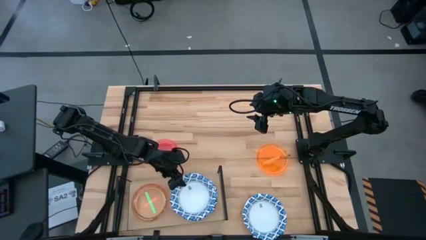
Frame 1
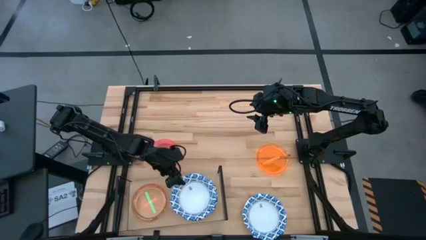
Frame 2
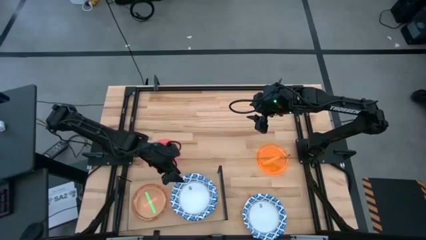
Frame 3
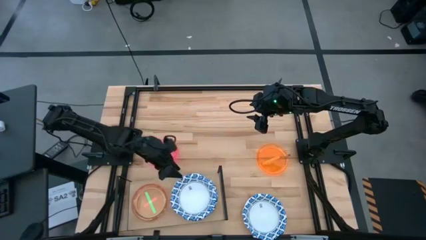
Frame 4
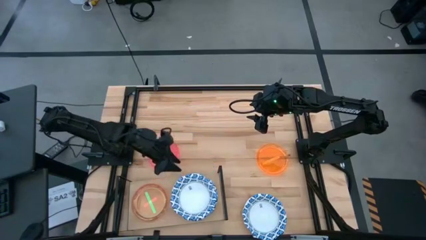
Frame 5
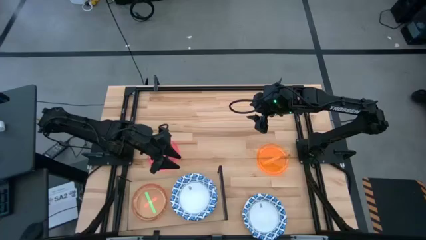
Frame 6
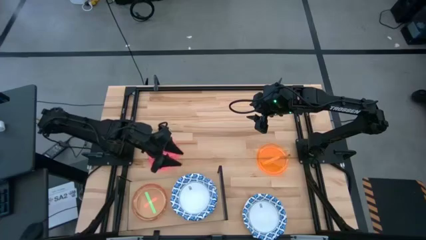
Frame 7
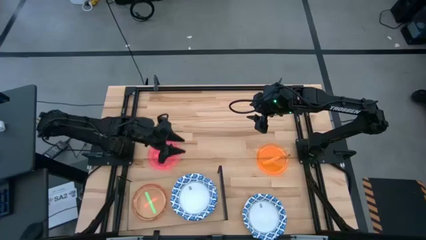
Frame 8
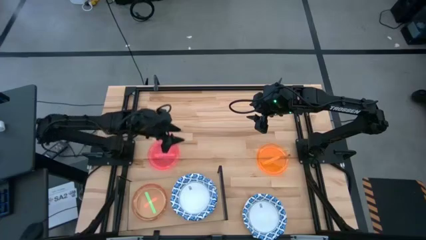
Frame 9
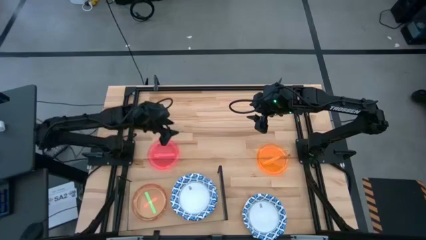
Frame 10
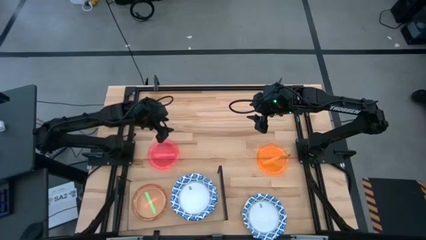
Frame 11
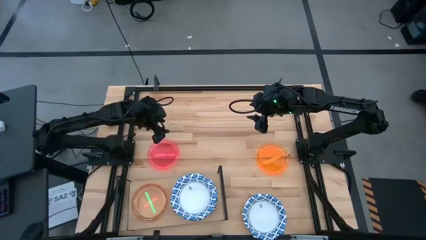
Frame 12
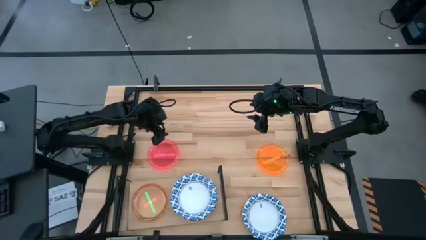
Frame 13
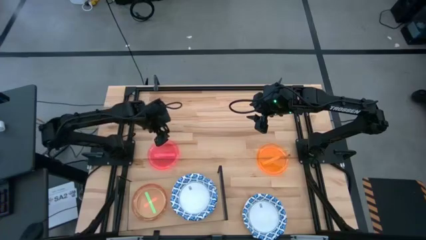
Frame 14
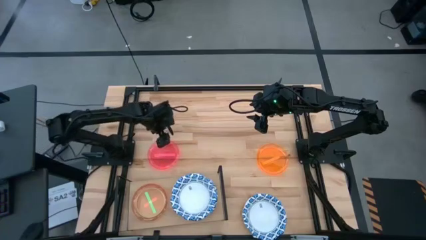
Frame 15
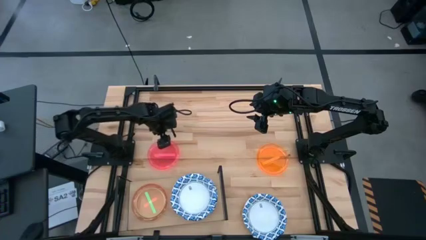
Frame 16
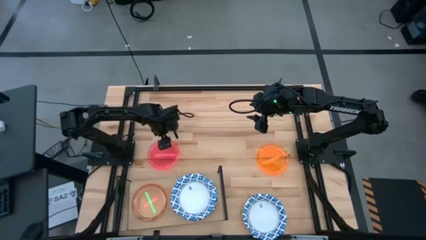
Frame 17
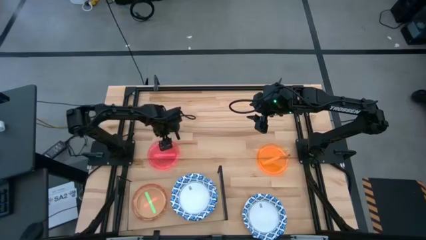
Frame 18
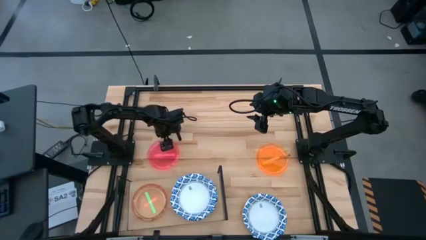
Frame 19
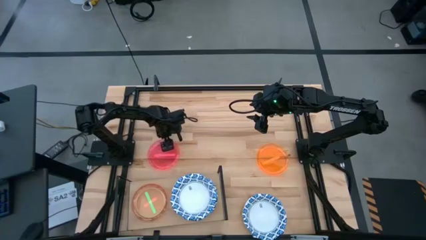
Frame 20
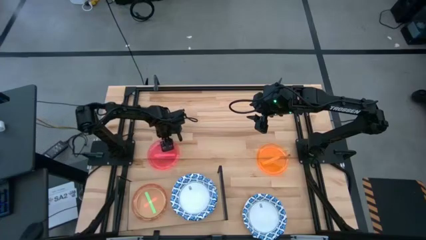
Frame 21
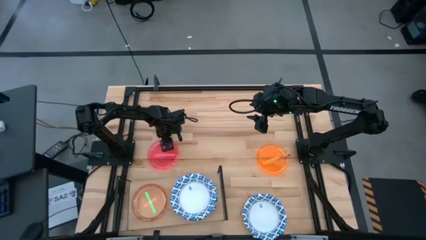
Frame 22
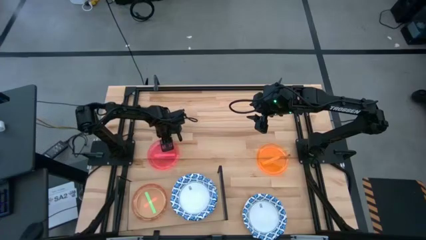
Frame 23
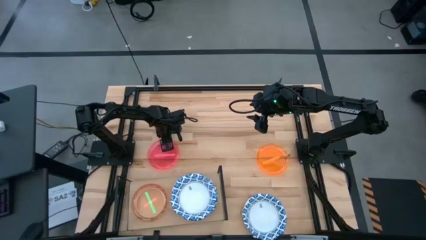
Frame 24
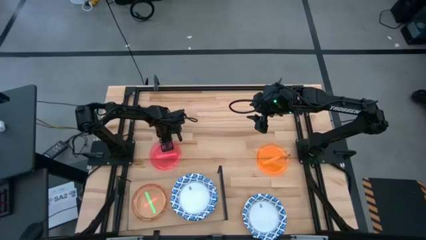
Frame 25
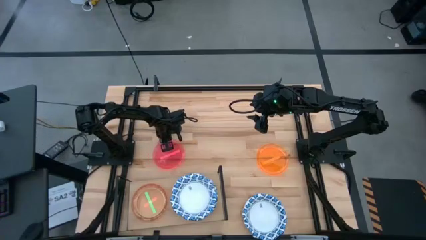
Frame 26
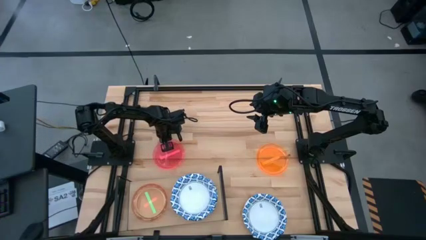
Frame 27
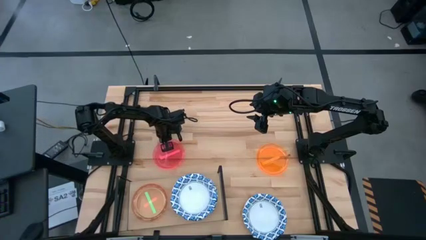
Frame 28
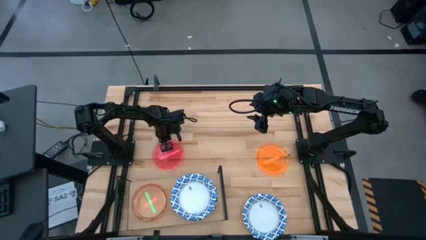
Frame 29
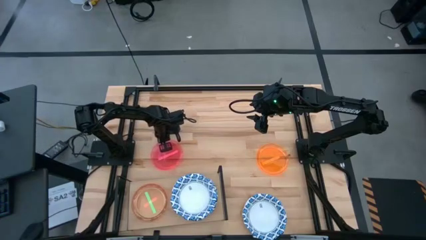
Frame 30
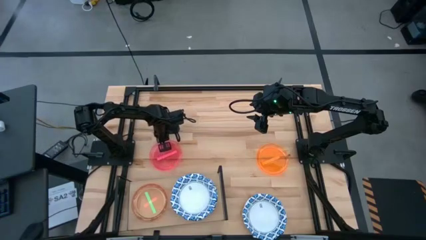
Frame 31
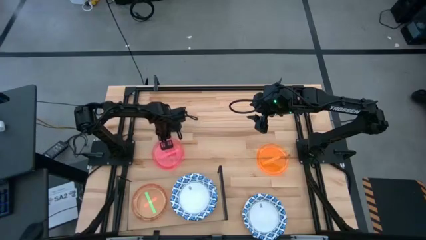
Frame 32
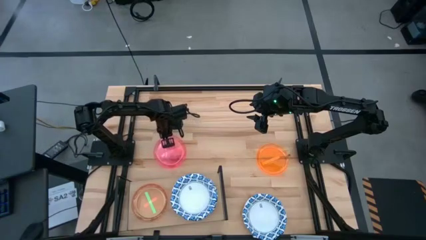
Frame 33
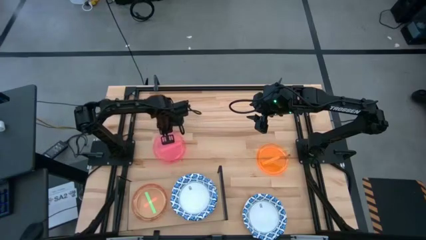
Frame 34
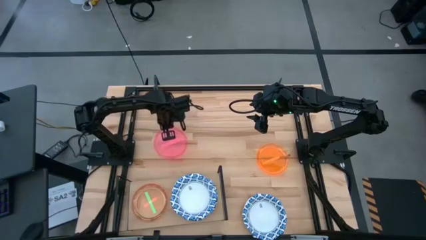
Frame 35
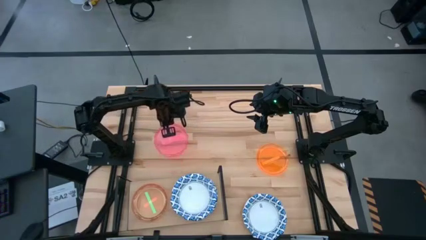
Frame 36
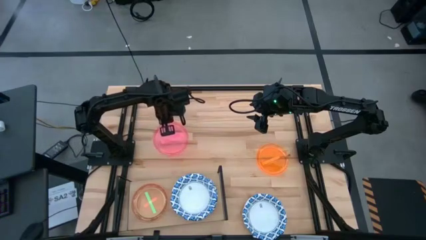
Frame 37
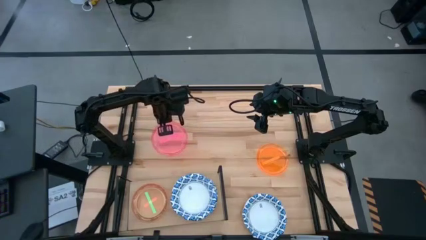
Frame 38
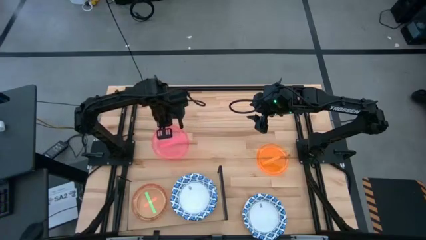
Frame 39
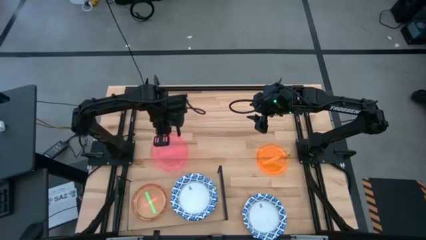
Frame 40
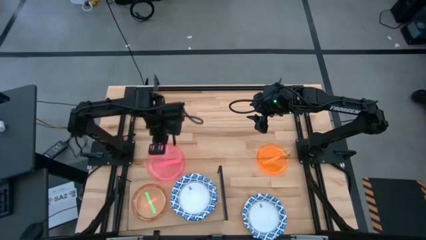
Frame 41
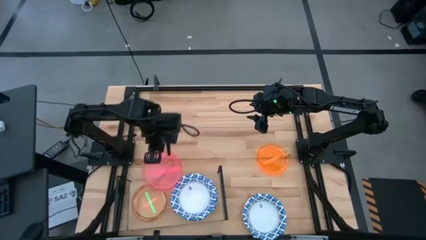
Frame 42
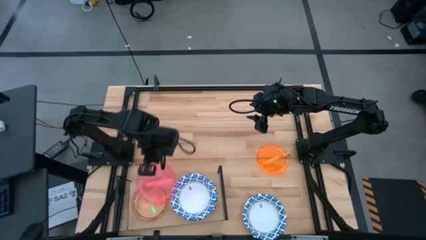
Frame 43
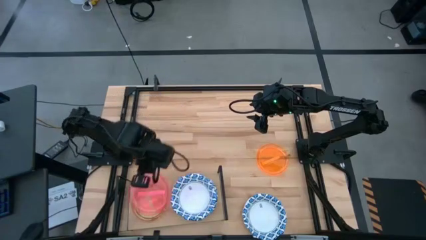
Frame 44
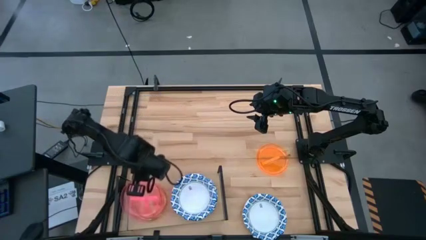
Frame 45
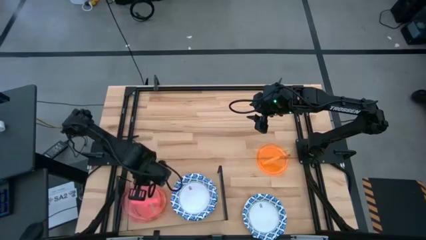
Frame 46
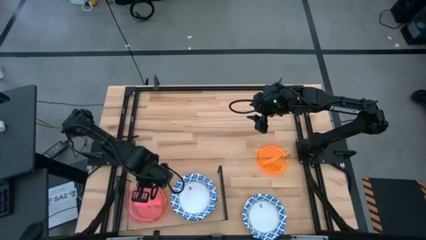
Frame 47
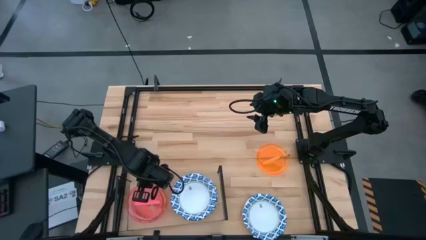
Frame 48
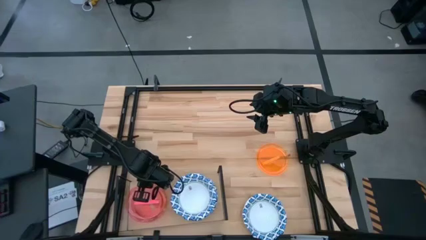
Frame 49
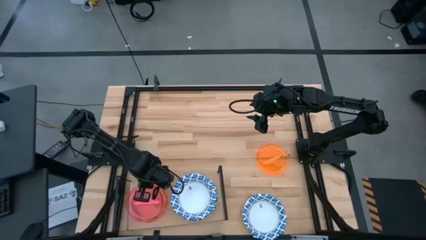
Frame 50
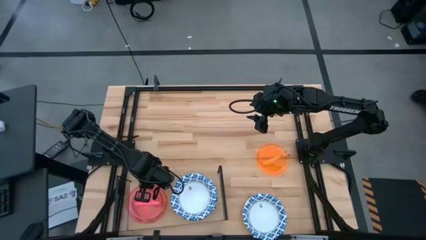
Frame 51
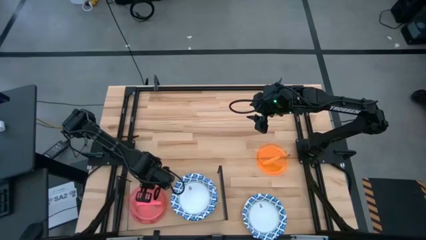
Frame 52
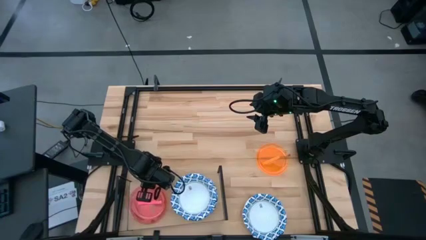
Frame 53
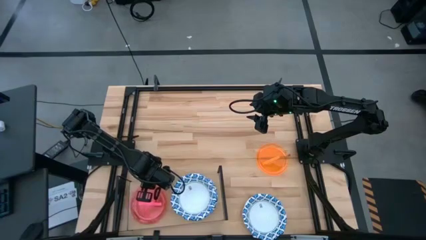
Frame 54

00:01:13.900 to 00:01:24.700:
Task: Place and stack plates onto a shelf
Stack the pink plate on top of the green plate on the shelf

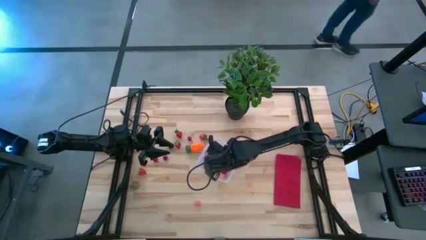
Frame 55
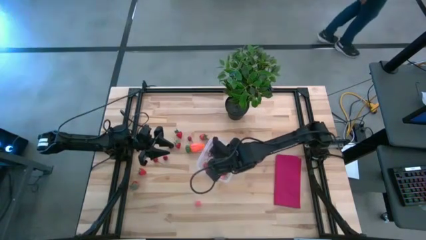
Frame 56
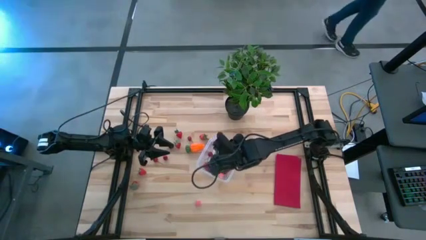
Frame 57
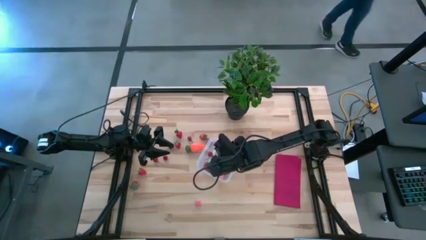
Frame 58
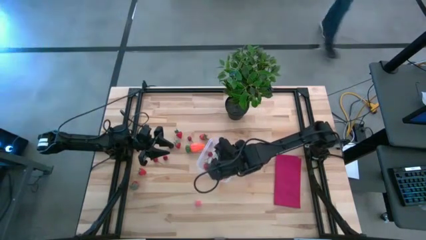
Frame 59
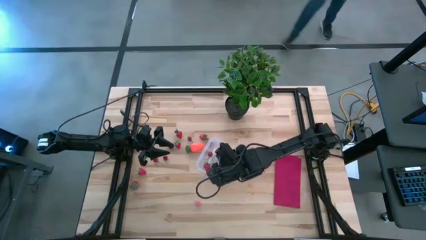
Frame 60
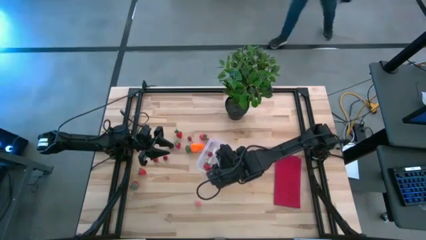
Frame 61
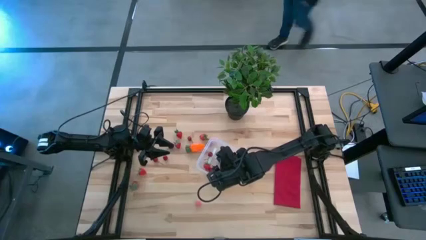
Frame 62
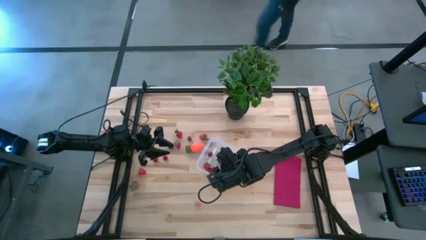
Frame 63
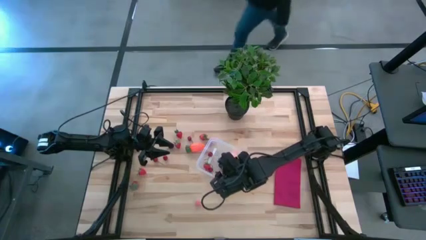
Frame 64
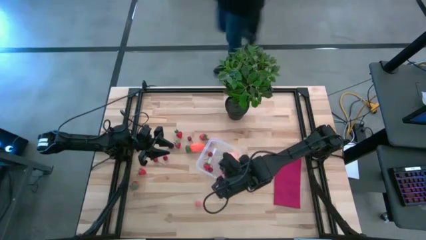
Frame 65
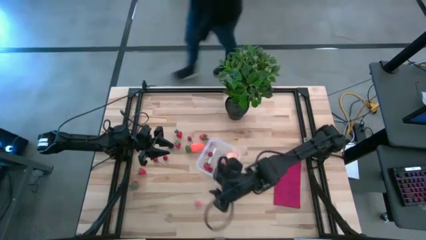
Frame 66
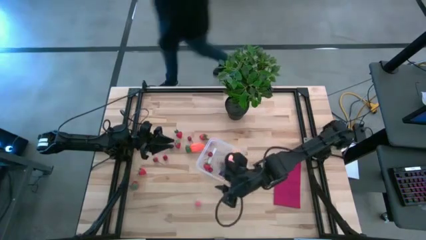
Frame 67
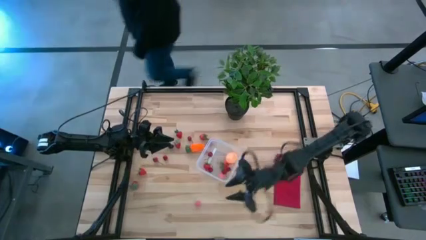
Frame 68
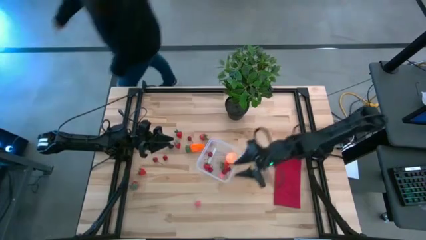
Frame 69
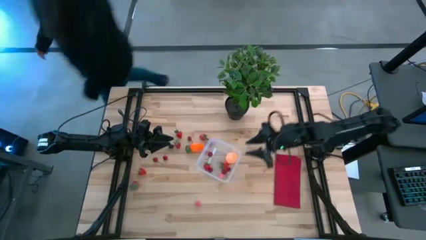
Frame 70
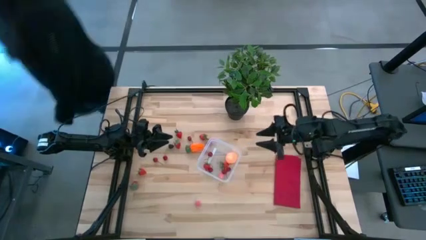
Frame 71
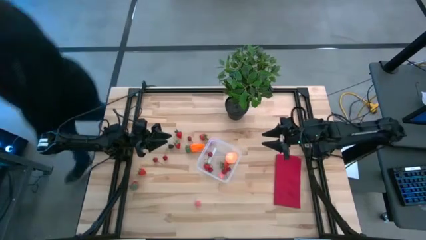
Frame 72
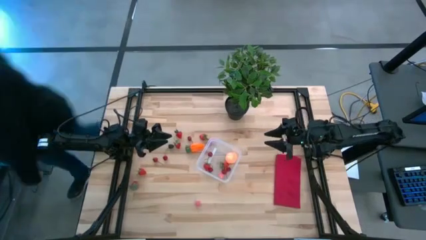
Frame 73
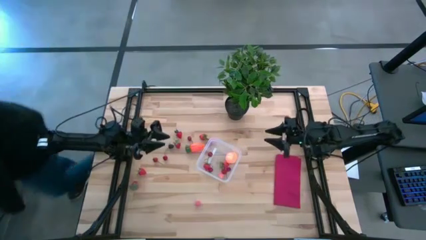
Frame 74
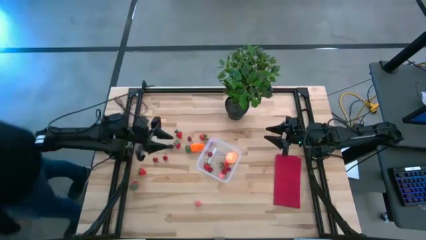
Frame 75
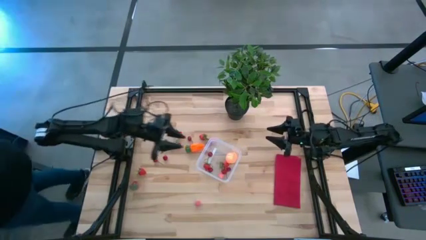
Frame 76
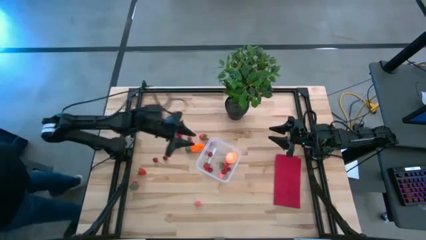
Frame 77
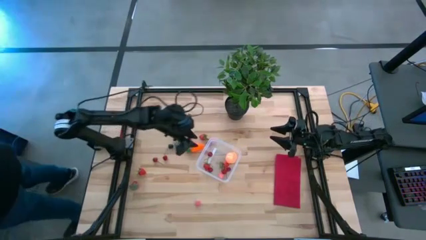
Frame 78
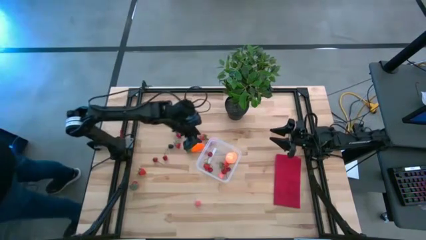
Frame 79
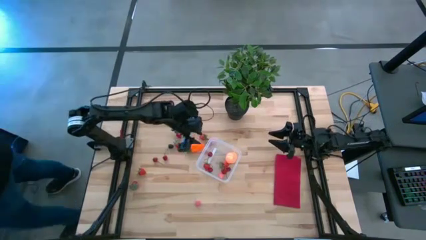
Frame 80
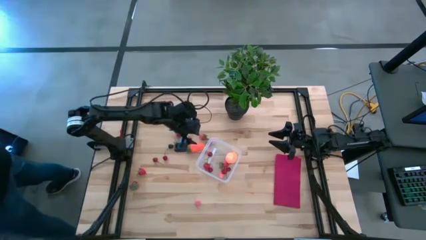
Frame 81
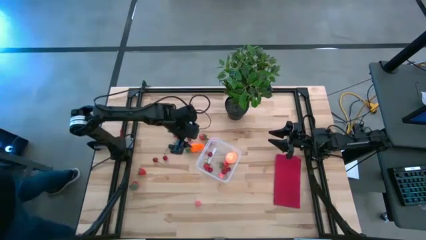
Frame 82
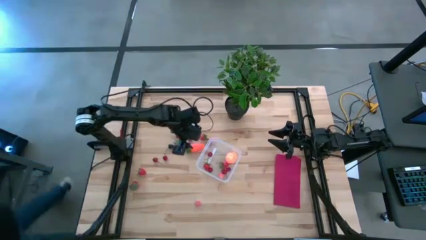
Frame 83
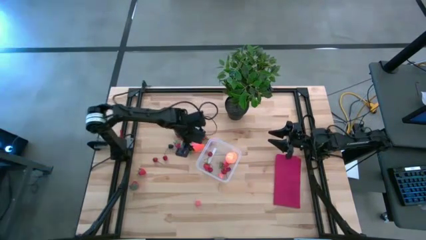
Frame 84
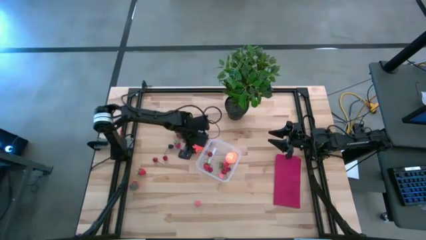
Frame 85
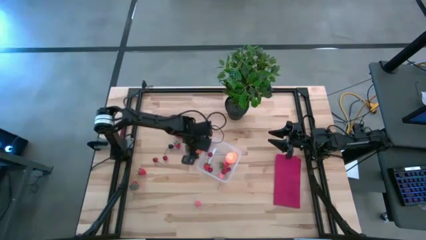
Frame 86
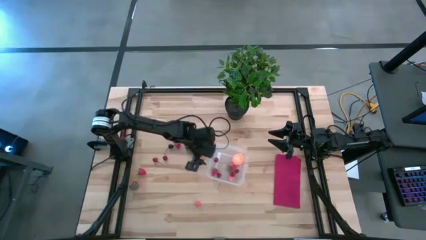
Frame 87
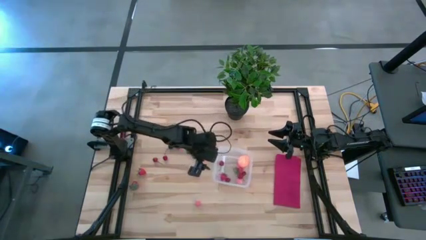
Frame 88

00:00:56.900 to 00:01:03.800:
Task: Pick and placing Produce into tupperware
Adjust the transparent bin
